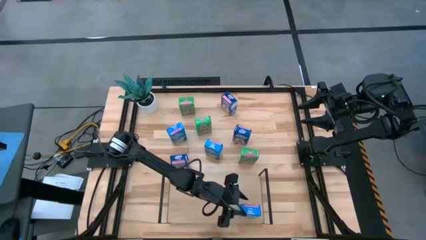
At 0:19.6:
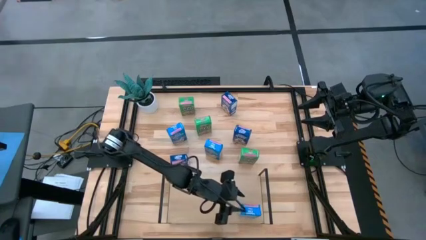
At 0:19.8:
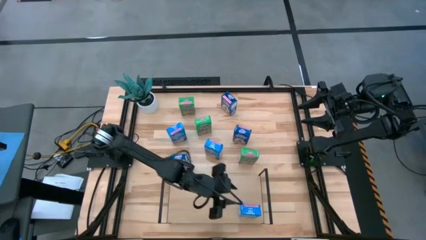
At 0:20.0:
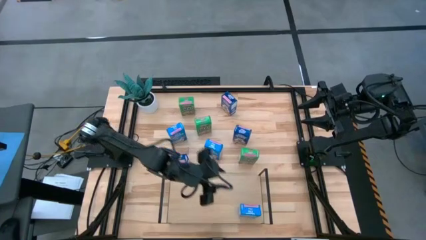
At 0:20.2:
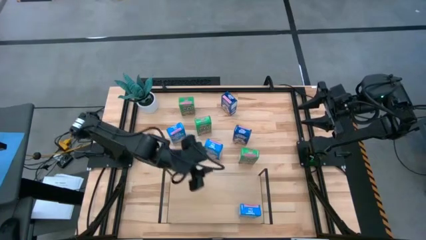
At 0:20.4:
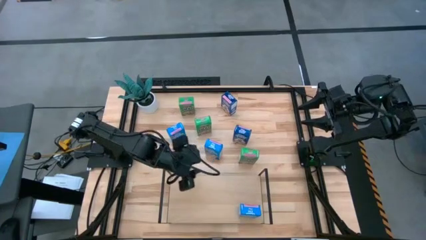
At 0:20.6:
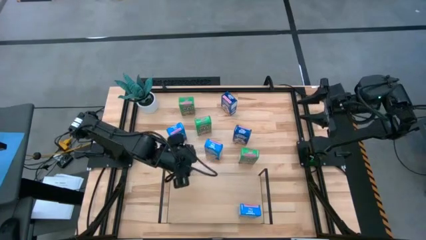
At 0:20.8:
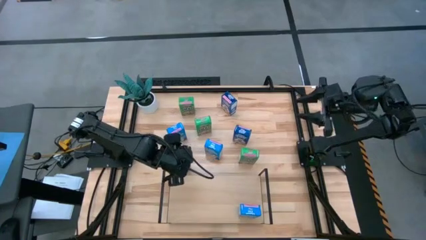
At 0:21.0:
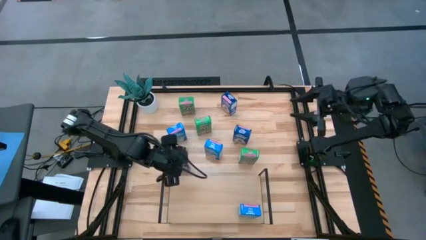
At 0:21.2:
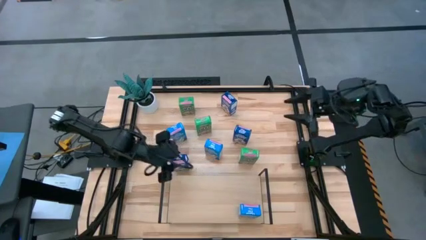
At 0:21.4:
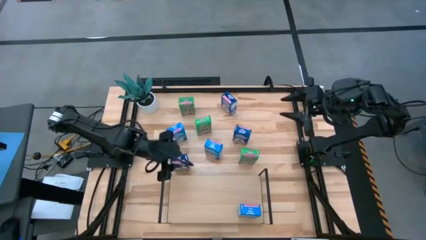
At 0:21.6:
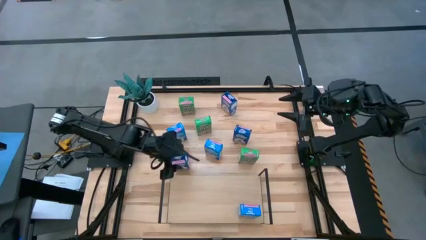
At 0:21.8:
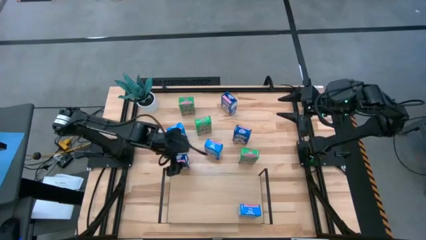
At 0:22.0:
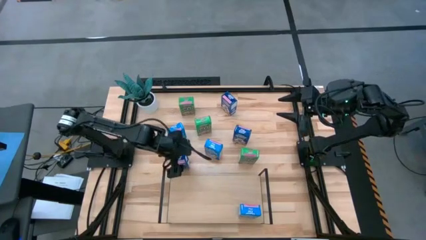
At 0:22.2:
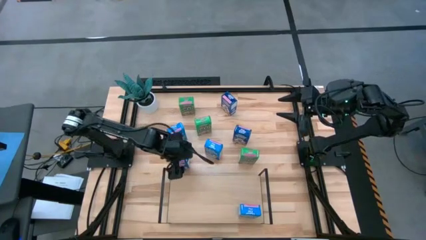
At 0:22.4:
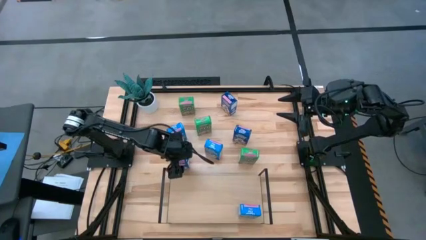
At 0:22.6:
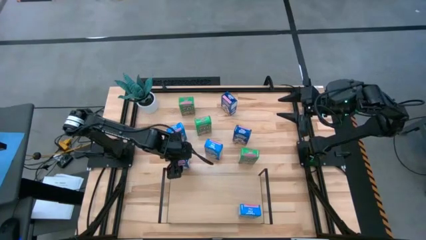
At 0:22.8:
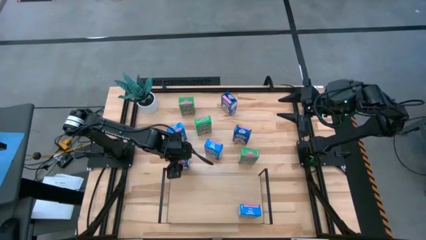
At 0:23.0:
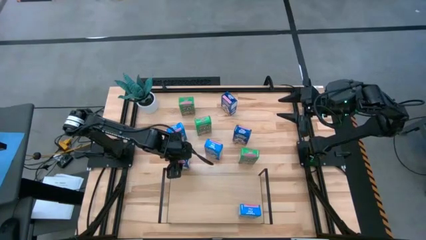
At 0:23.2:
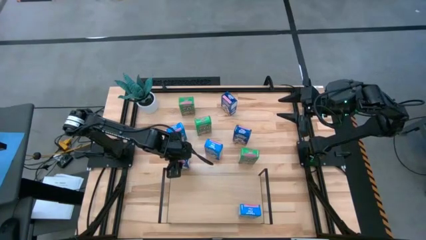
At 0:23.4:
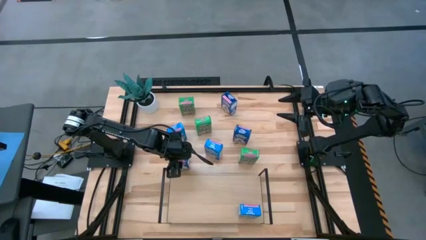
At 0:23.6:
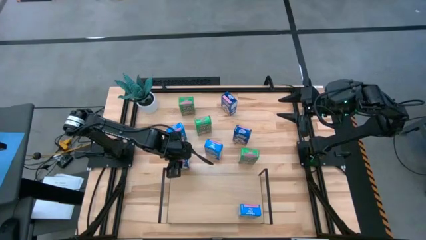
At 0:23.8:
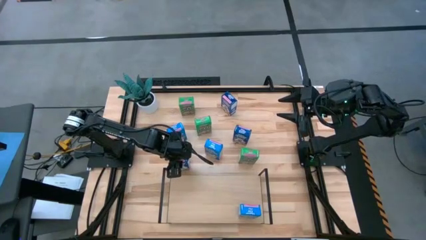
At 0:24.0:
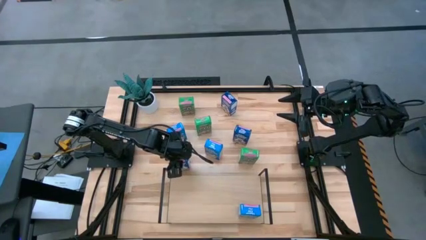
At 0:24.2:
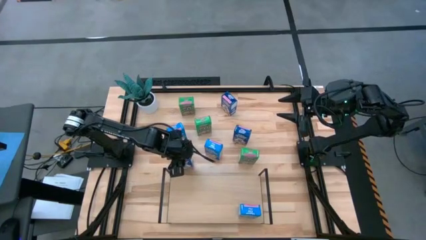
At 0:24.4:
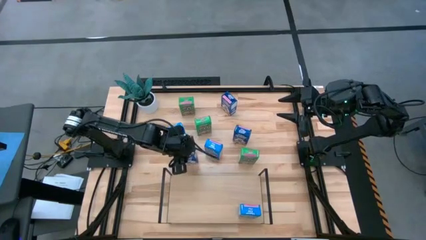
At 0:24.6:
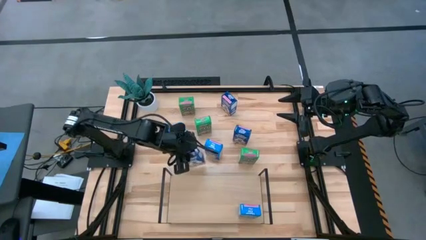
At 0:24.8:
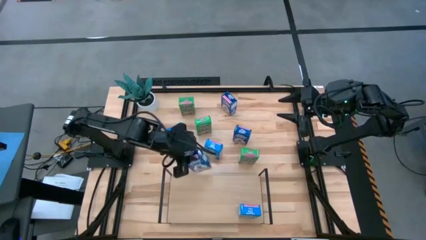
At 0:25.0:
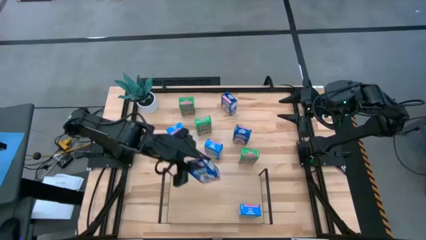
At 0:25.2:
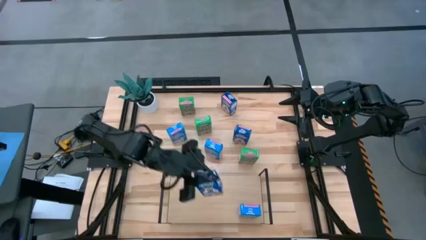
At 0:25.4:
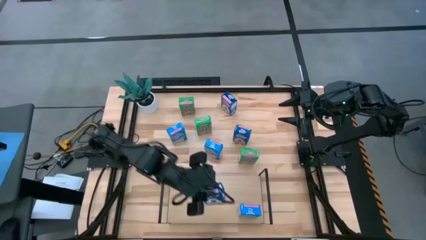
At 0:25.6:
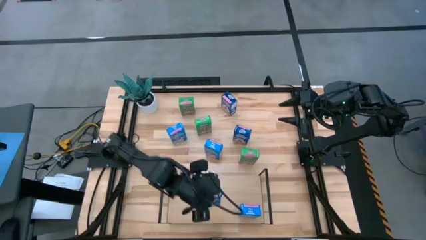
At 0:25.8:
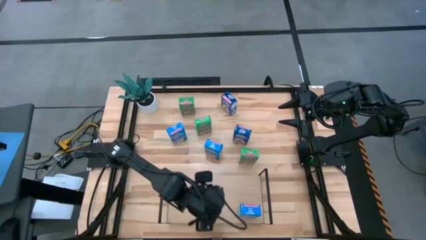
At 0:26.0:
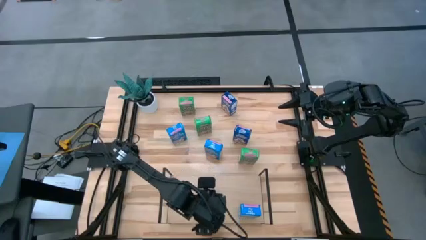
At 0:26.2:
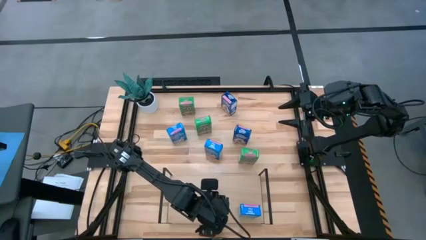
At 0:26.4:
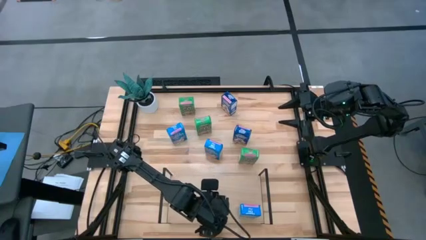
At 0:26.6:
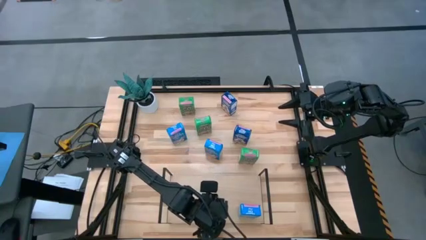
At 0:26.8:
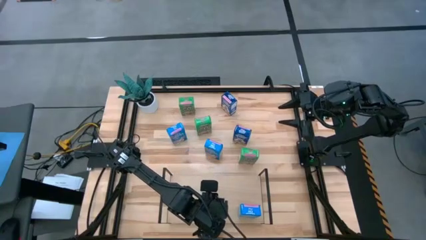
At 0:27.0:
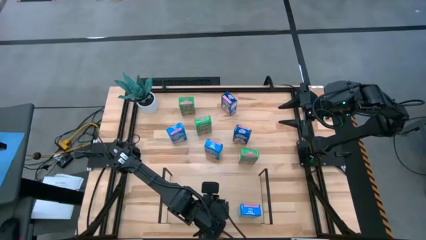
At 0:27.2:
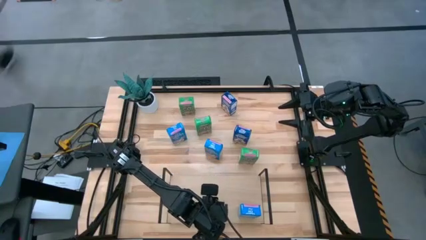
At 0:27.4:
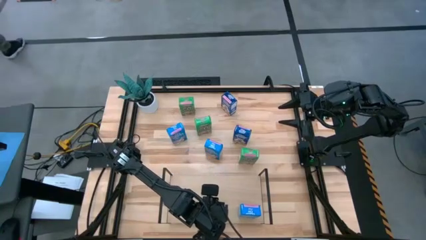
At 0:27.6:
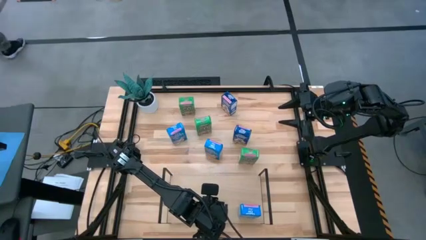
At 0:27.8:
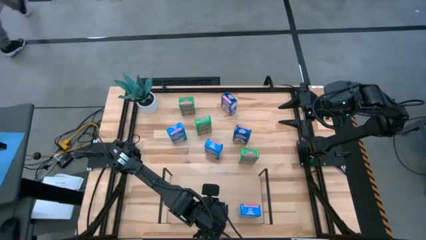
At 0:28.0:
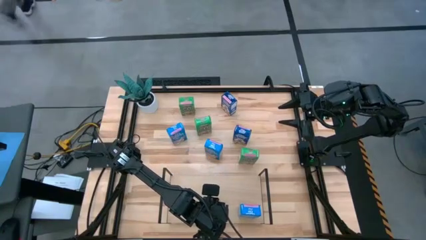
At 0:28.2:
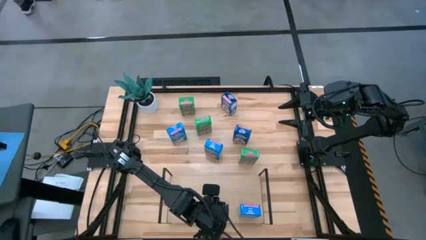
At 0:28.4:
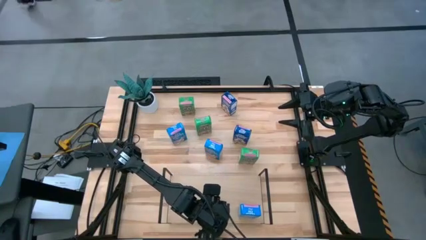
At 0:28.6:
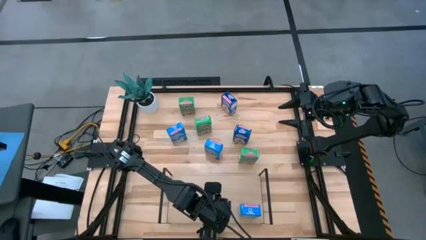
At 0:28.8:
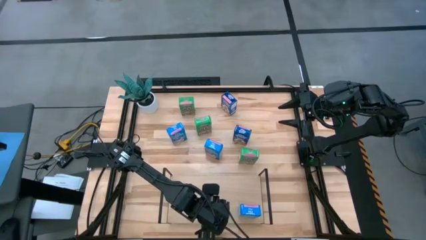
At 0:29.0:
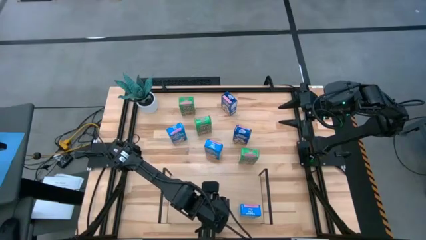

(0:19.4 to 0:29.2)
Task: Stack cereal on shelf
Put the bottom blue cereal box on the shelf
